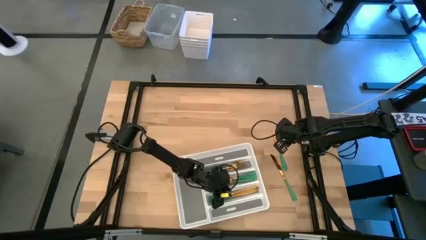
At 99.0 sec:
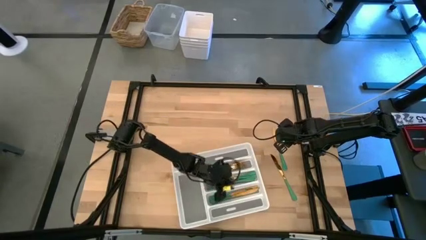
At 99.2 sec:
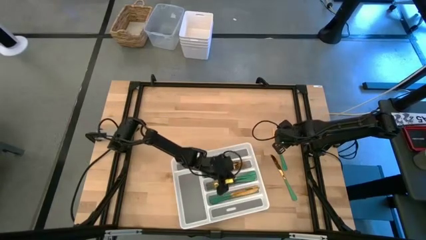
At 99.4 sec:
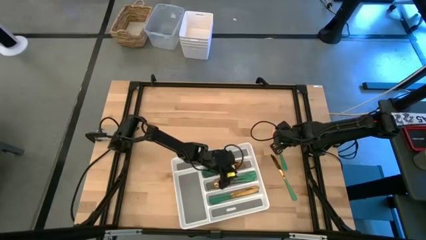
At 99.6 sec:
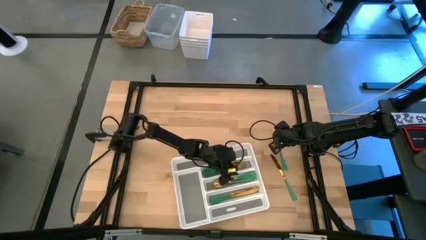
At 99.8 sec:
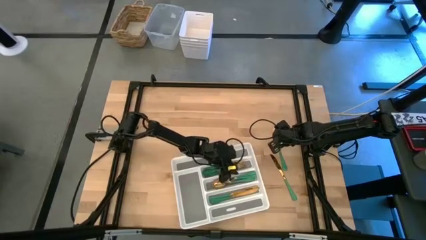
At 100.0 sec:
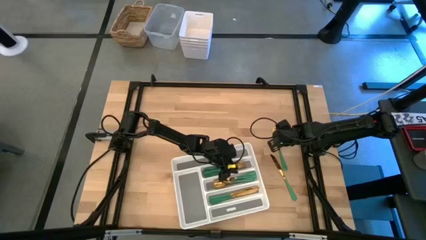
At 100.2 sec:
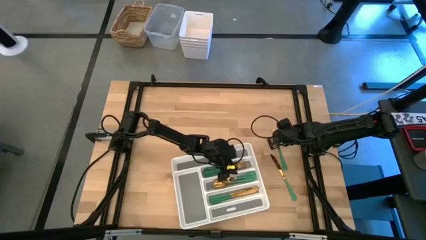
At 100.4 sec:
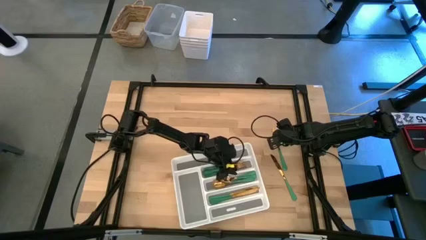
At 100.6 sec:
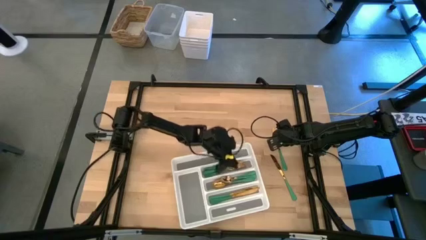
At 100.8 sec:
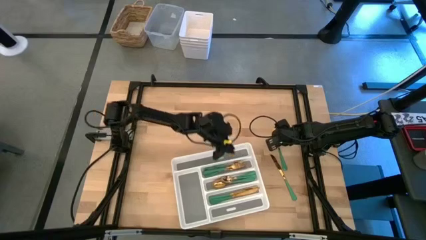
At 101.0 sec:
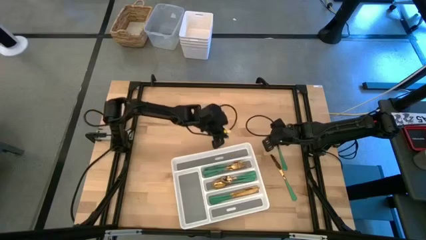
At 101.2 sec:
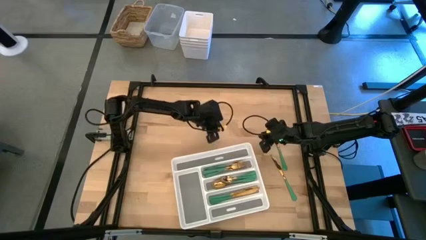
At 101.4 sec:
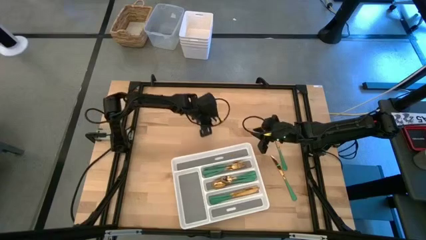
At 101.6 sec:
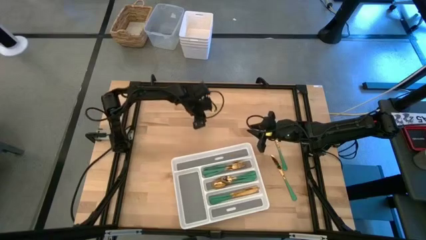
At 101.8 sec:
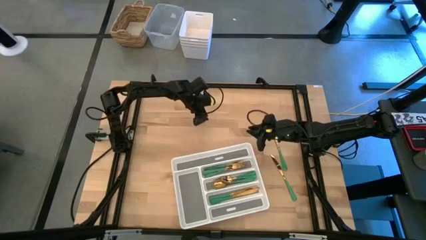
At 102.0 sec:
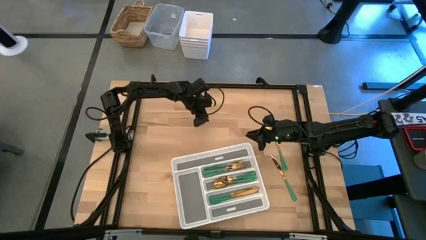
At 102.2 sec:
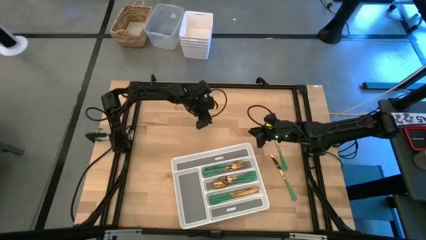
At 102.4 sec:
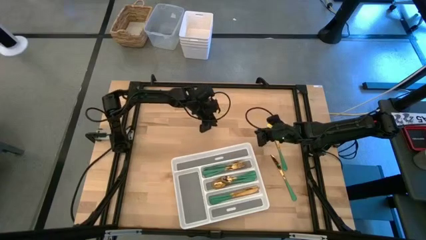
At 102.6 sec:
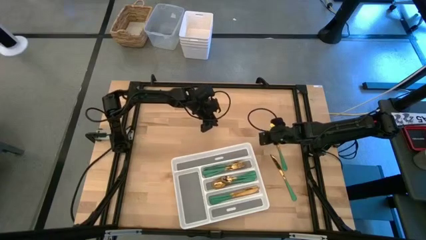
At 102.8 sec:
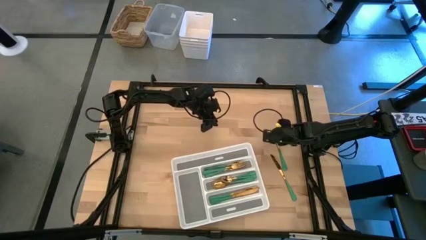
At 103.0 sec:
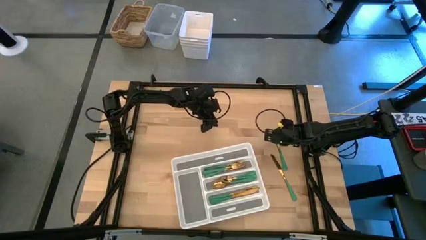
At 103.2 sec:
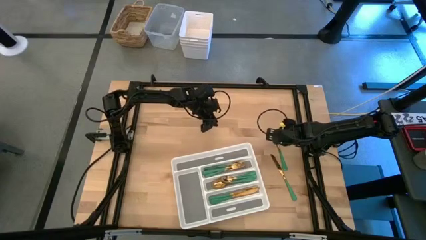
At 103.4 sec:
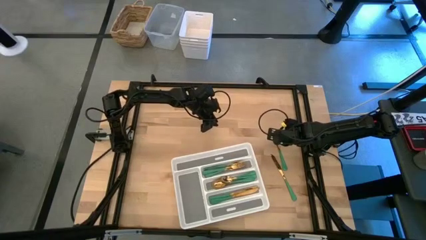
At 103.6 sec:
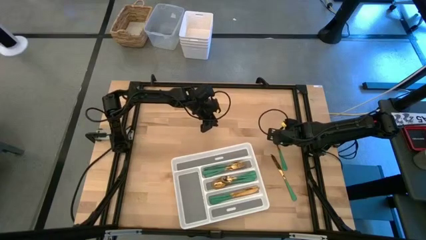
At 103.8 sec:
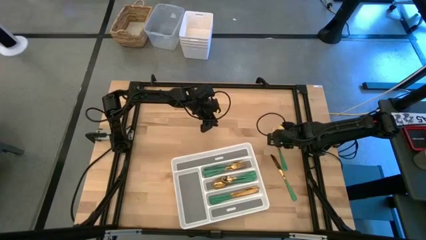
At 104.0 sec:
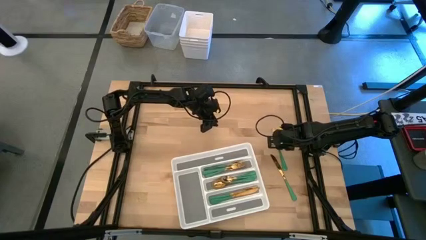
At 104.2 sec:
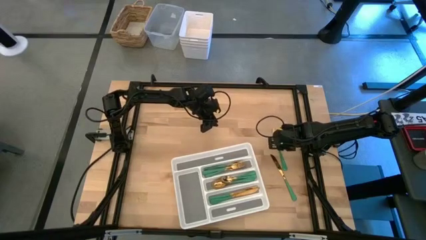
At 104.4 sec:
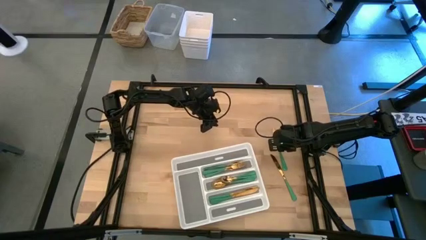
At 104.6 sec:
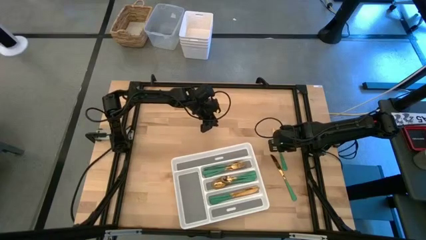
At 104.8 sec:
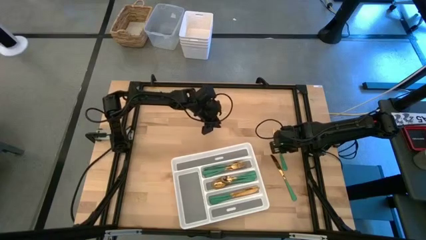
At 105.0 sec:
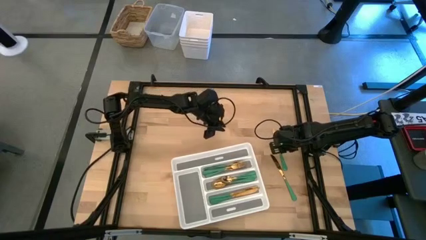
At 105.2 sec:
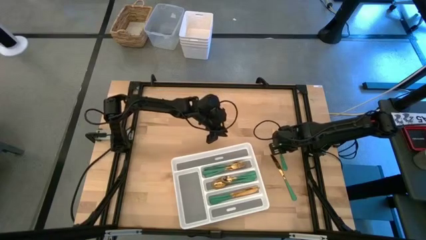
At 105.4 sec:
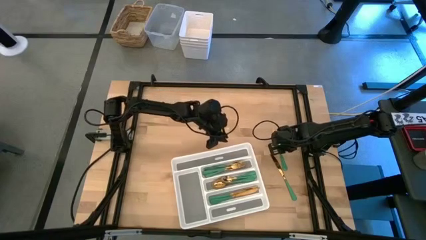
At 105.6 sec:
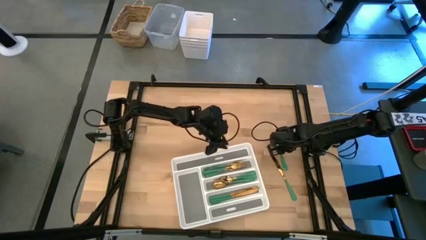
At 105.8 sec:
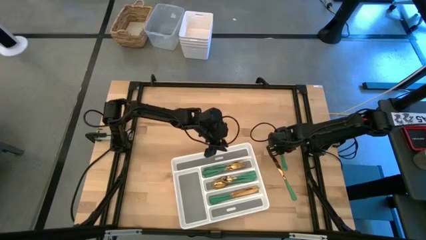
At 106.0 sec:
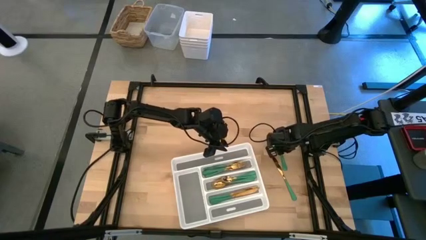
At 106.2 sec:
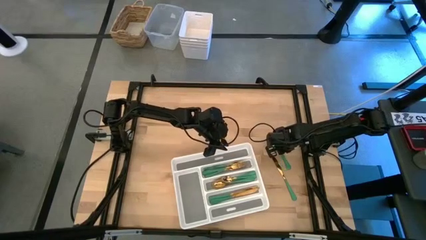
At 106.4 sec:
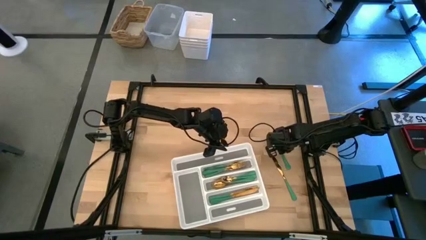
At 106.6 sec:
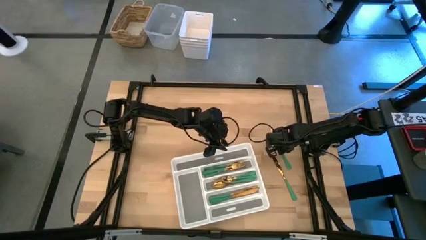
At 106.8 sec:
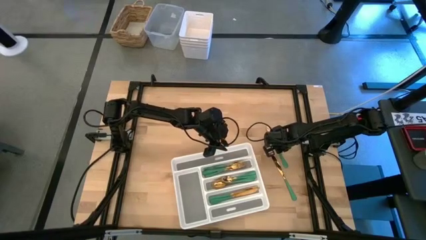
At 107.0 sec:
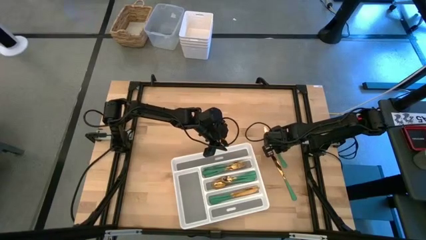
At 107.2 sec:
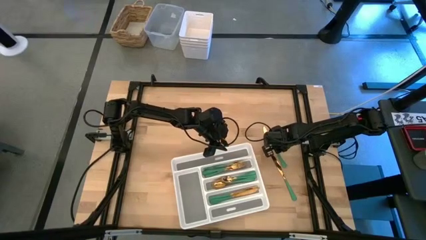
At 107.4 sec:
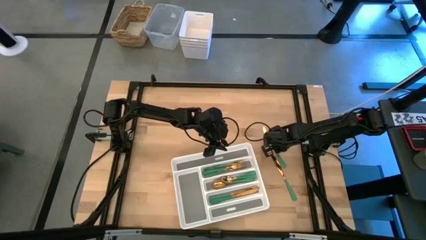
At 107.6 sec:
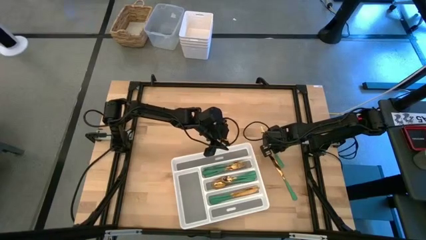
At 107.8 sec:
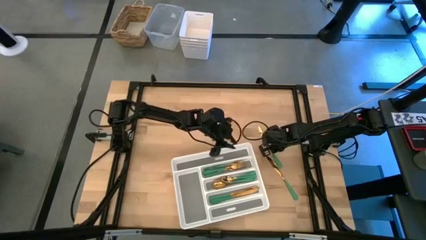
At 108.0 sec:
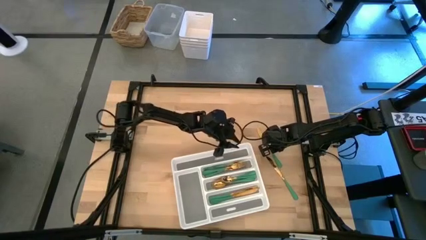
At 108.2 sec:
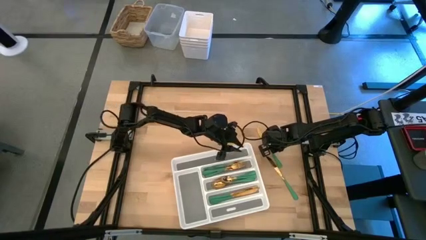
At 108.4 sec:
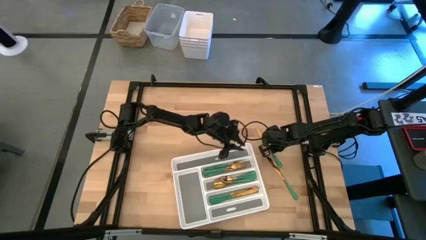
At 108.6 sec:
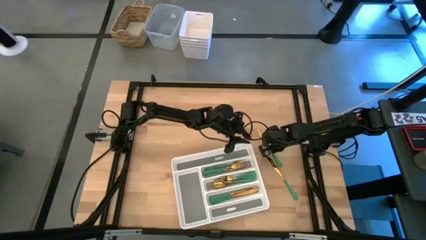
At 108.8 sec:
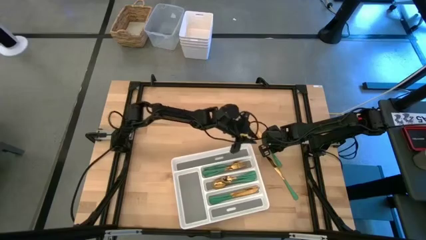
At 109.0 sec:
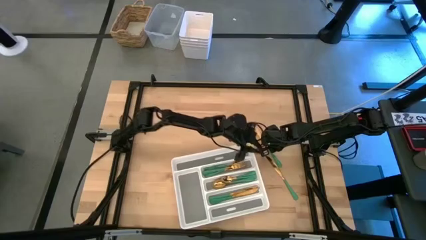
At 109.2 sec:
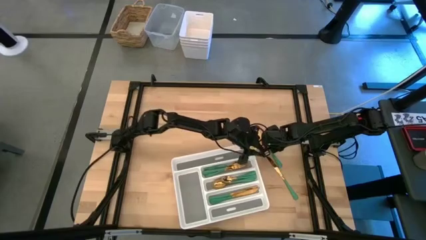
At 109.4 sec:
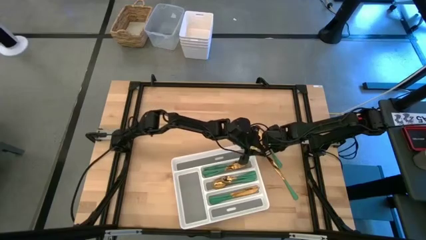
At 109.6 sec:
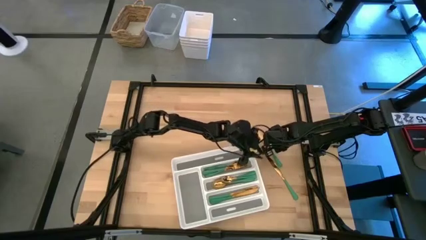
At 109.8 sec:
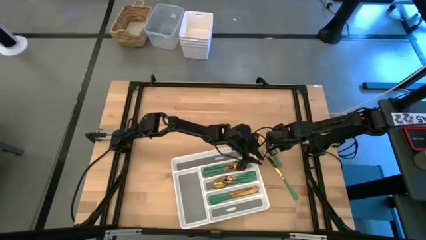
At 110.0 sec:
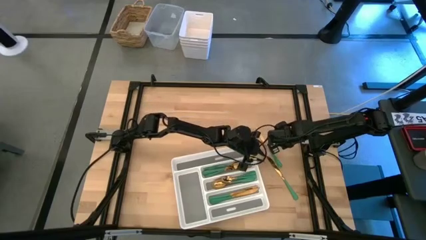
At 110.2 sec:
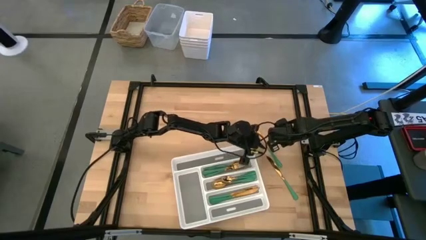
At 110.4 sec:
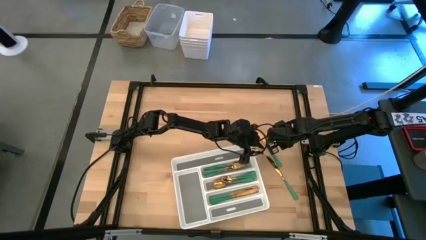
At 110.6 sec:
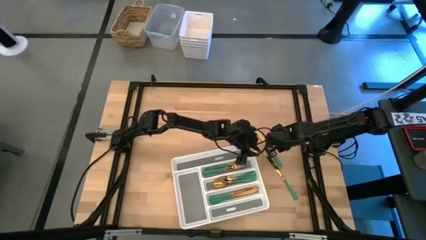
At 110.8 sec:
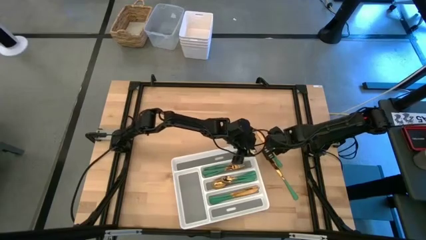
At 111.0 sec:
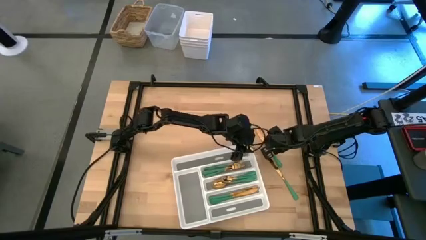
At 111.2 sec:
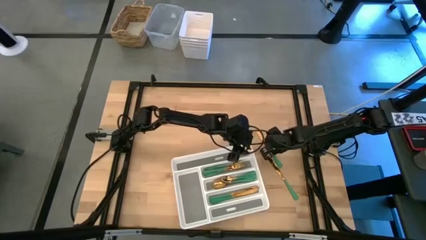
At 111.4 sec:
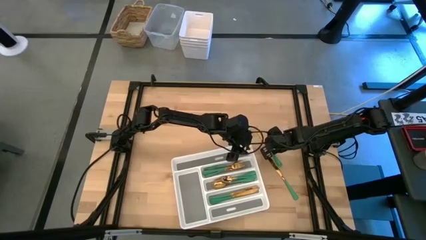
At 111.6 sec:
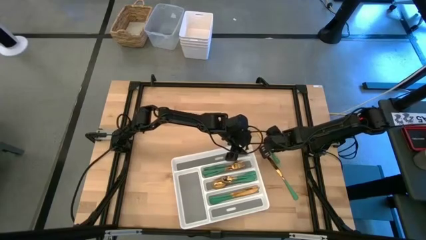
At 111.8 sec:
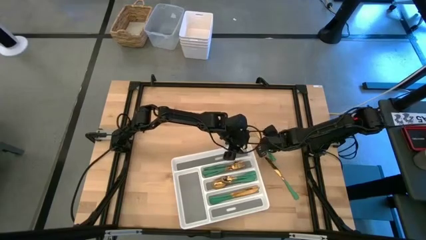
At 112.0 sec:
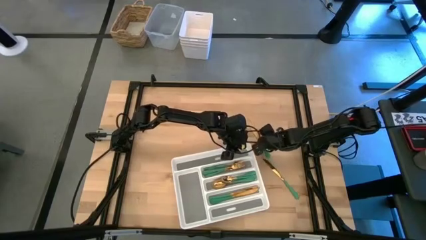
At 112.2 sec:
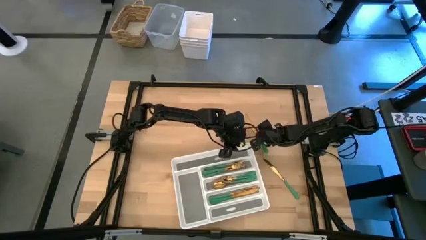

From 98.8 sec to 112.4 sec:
Task: Sort silverware
Put the green knife into the white silverware tray

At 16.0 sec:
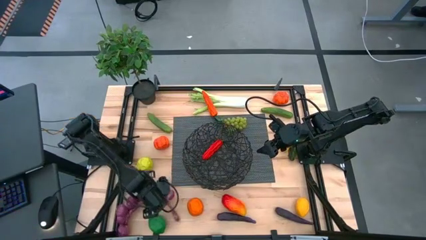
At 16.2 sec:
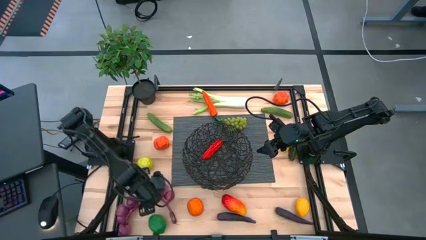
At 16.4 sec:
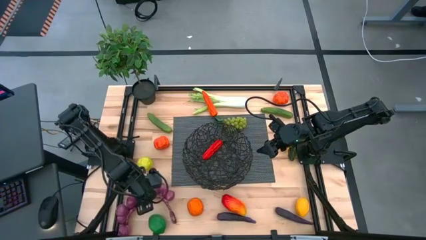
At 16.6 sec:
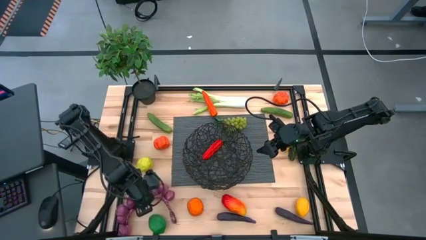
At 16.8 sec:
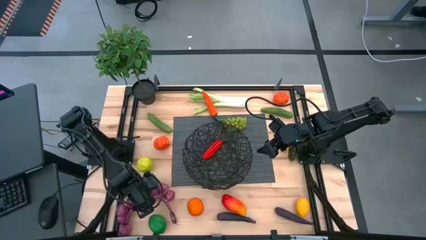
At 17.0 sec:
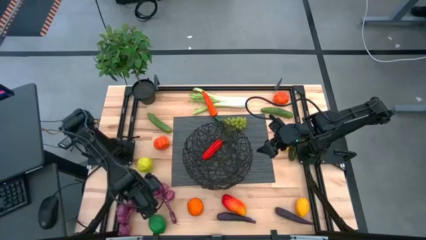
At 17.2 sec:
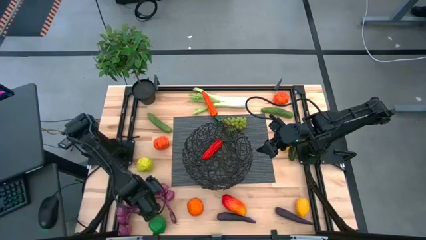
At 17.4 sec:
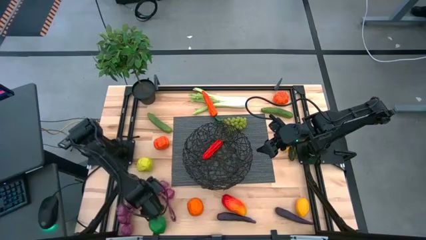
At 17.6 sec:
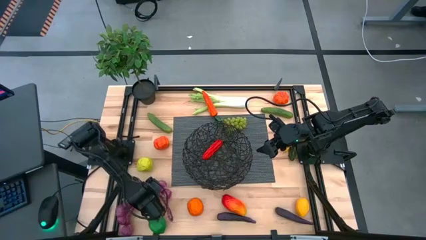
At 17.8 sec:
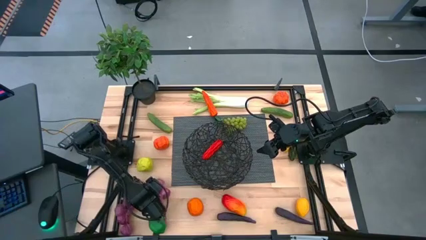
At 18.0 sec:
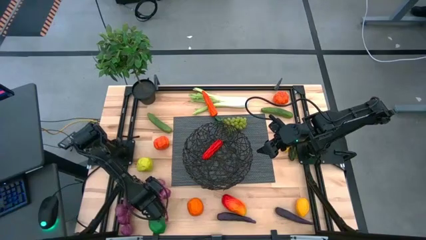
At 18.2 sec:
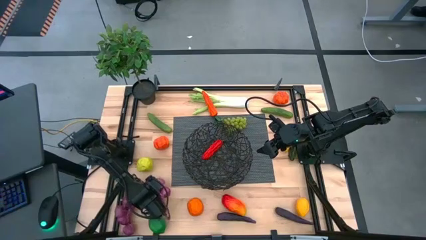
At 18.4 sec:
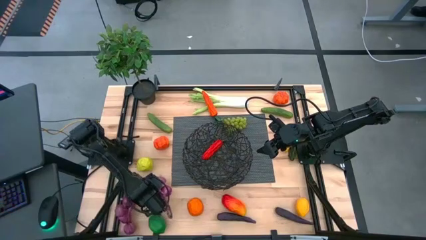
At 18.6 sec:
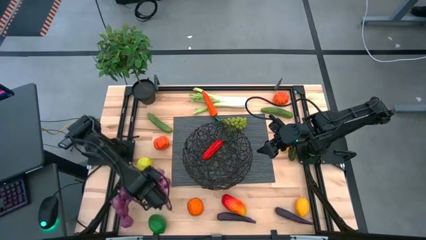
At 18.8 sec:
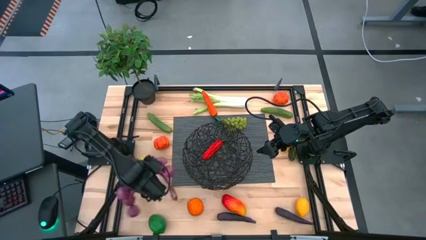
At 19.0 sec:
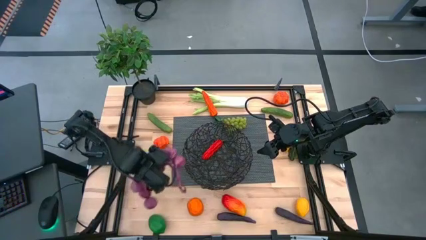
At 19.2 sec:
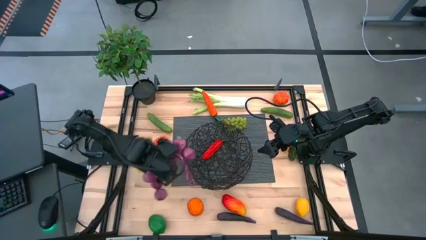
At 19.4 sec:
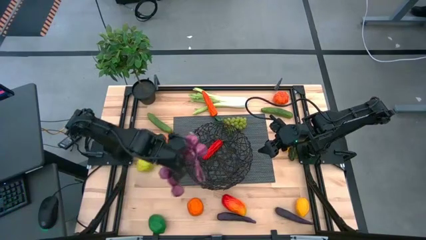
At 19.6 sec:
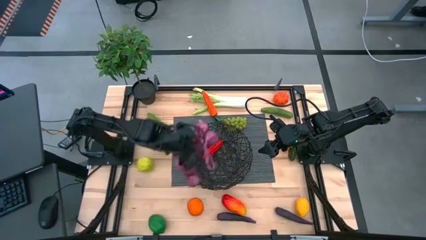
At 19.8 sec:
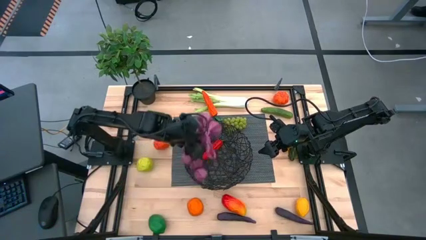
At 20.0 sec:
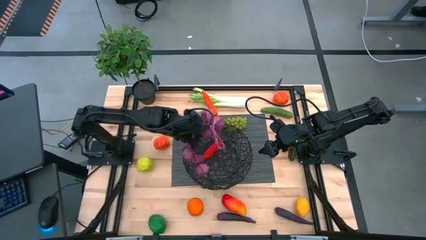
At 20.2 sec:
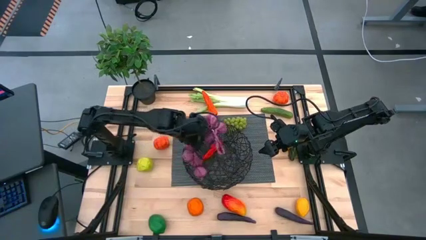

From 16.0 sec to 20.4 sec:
Task: Build produce basket
Put the purple garlic into the black wire basket
